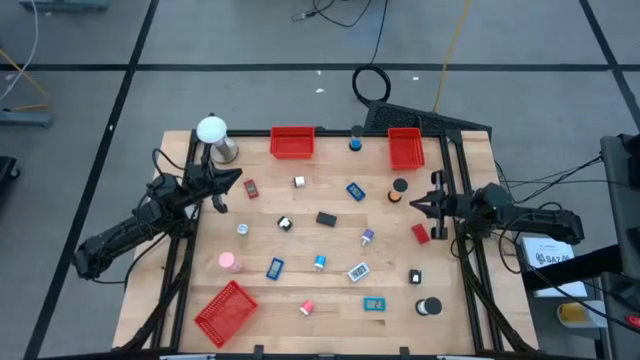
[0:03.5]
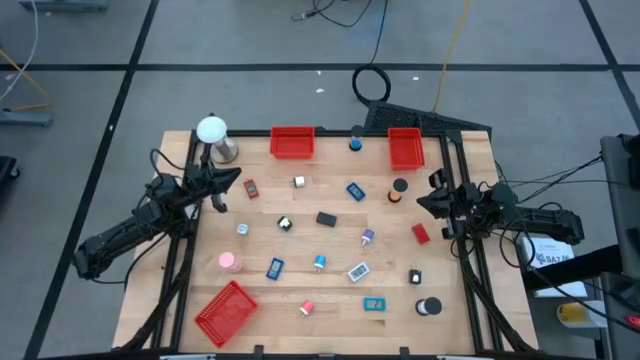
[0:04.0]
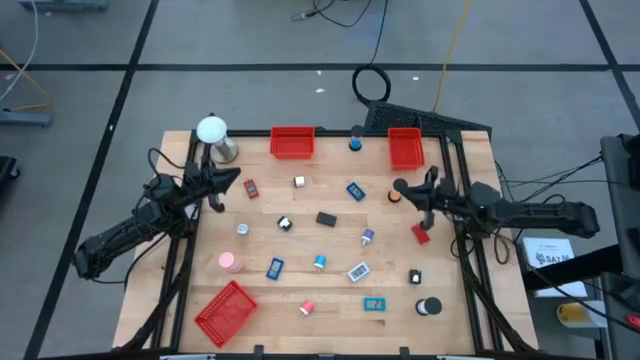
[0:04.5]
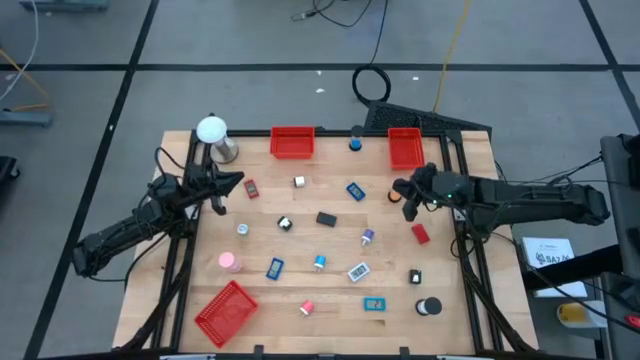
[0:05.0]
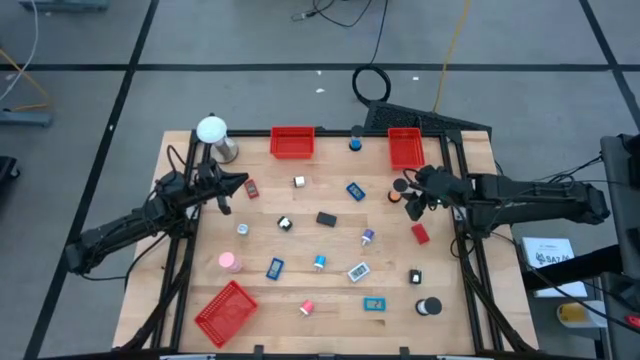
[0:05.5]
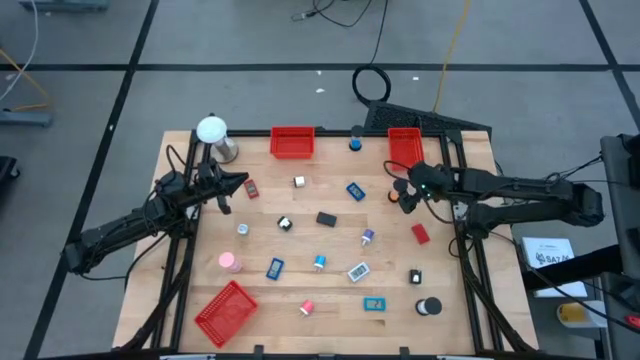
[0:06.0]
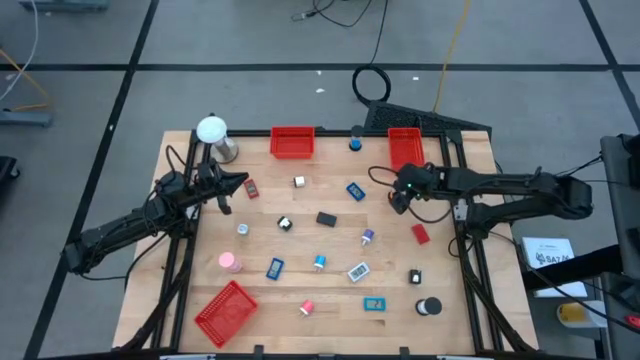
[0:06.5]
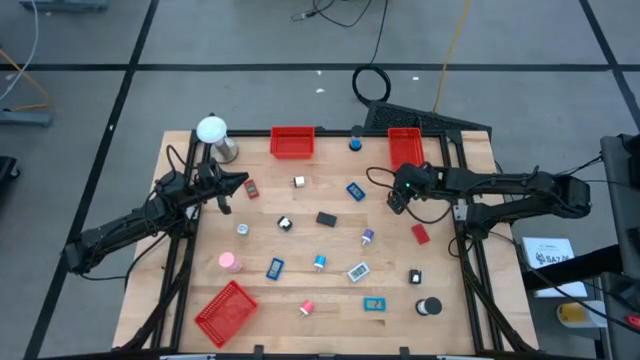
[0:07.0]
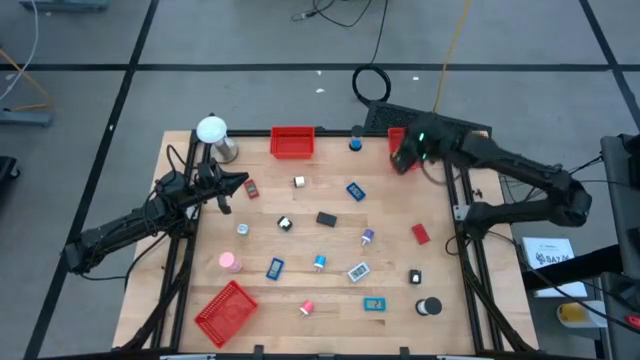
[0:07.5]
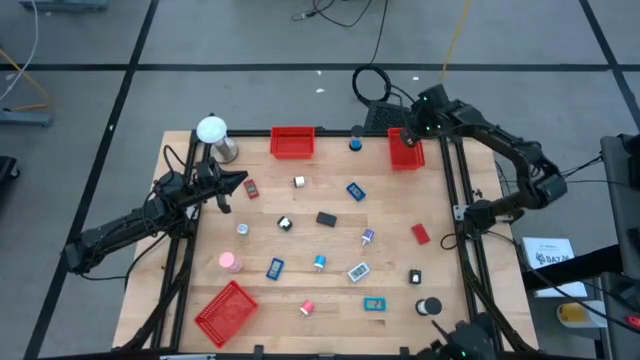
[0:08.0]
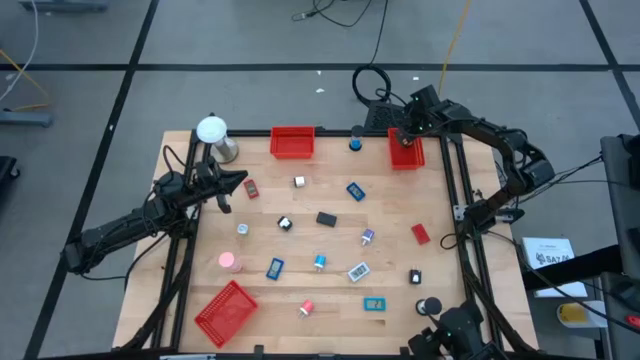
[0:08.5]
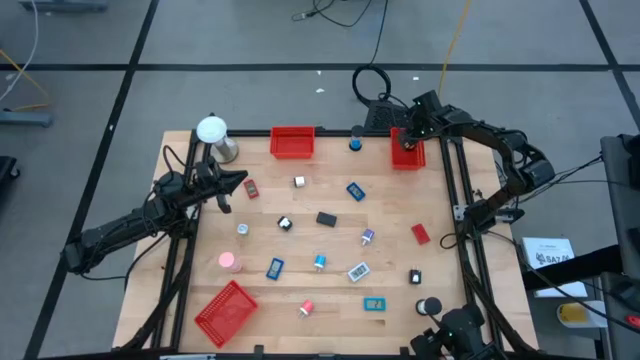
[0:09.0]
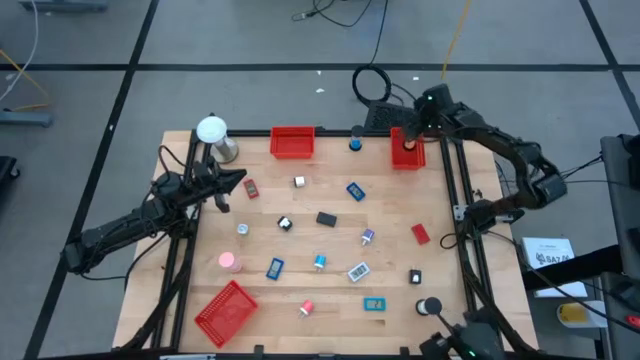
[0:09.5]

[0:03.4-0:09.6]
Task: Pick & Place Office items
Put the orange hourglass into the top right red basket

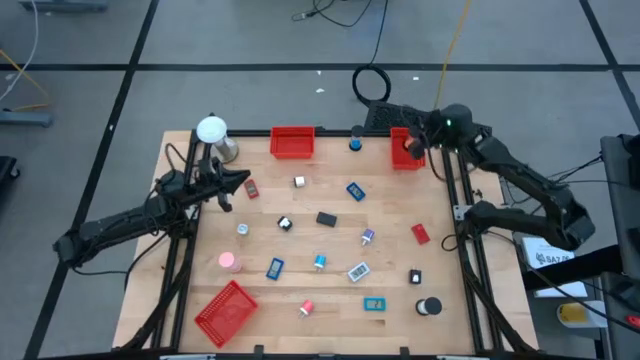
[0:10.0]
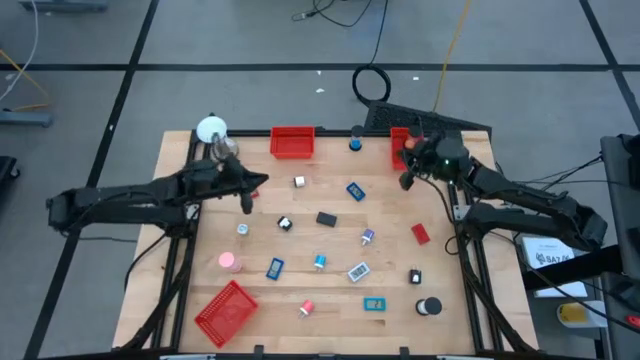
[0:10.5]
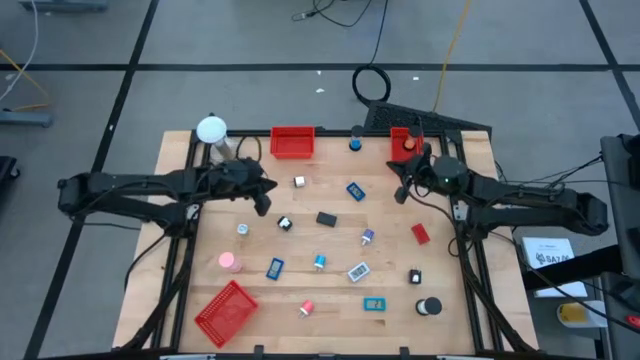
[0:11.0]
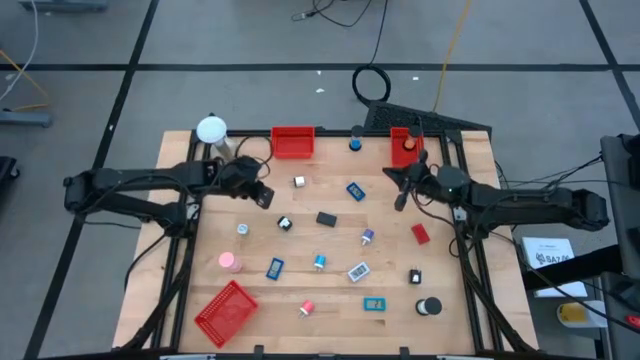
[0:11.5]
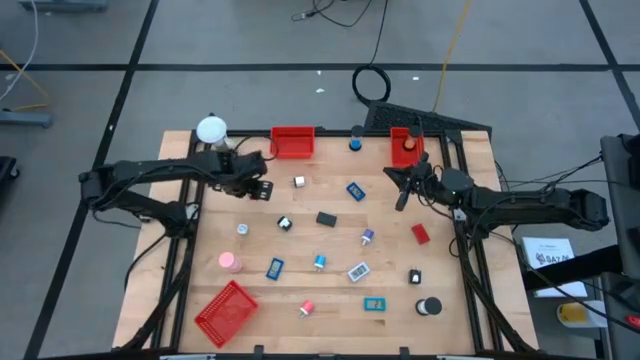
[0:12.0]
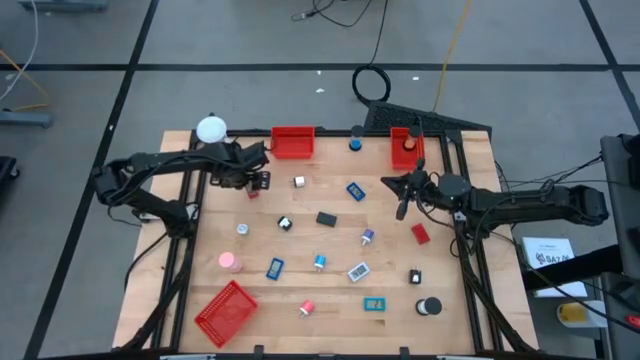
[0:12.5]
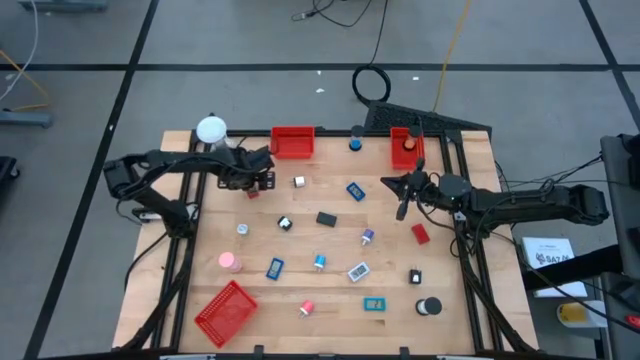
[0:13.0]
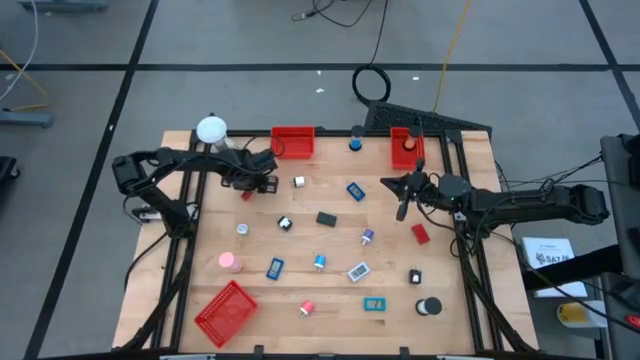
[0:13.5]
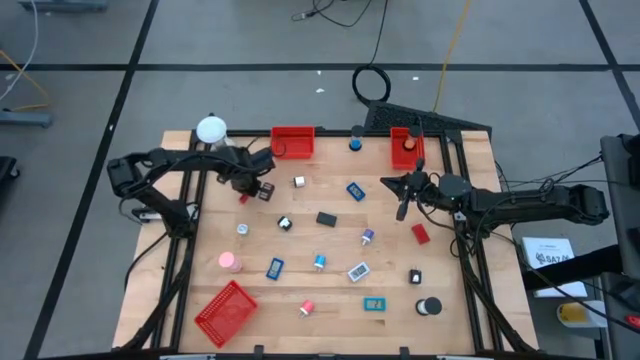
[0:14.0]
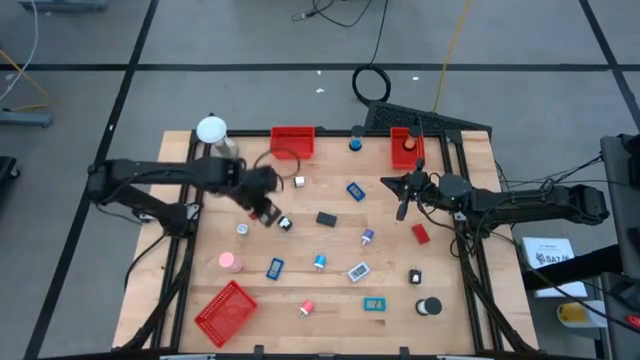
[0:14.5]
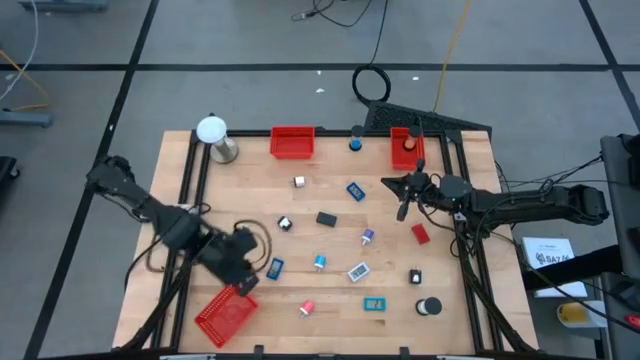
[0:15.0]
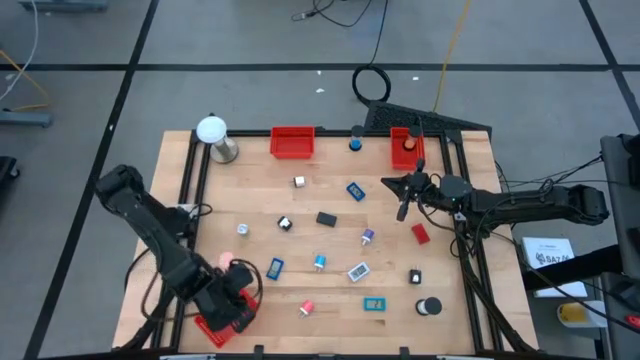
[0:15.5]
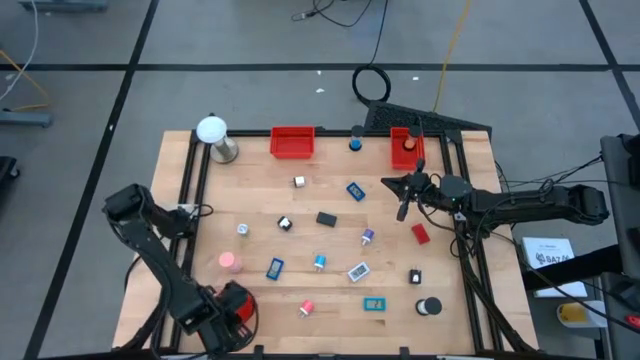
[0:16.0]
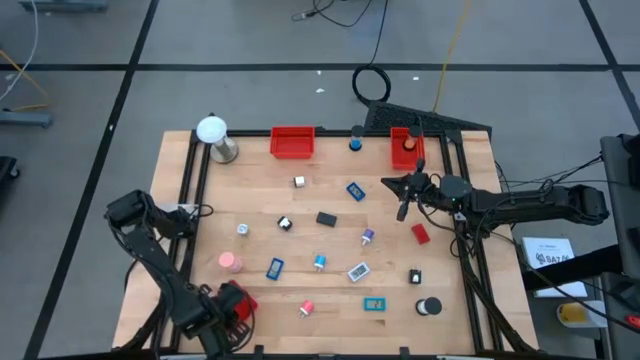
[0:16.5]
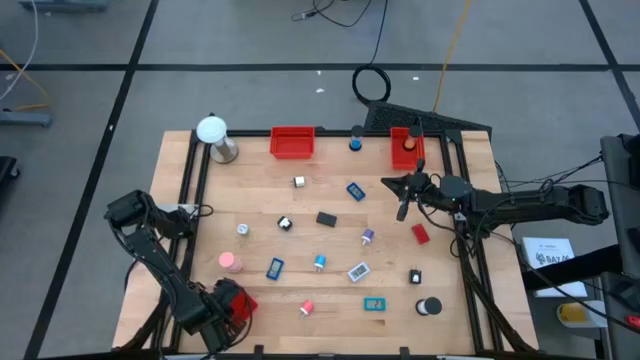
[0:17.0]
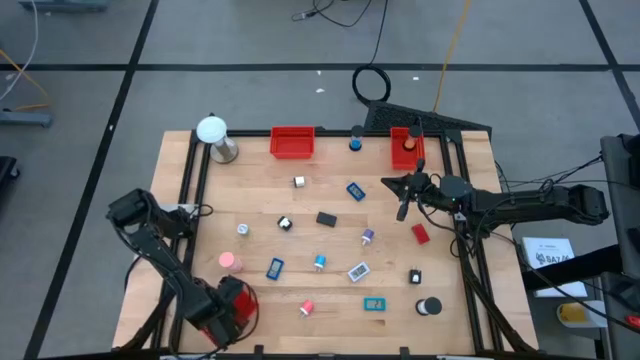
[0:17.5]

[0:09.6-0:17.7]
Put the left red timer into the bottom red basket

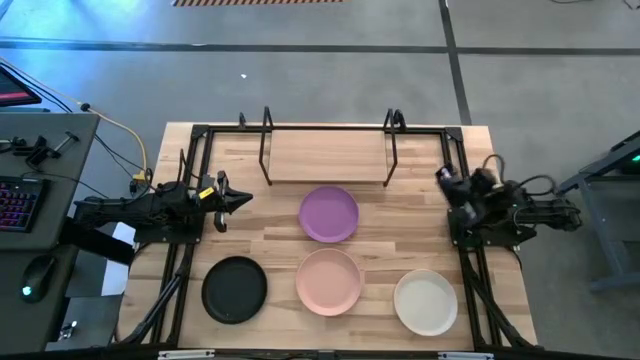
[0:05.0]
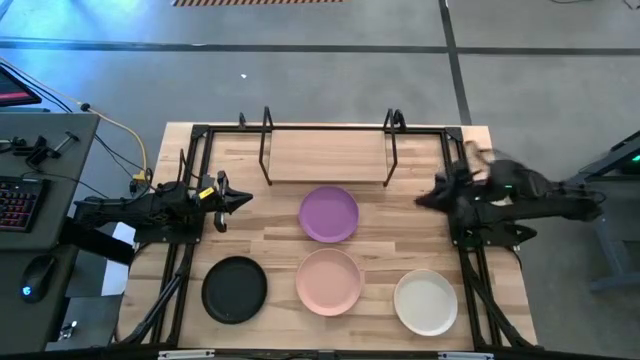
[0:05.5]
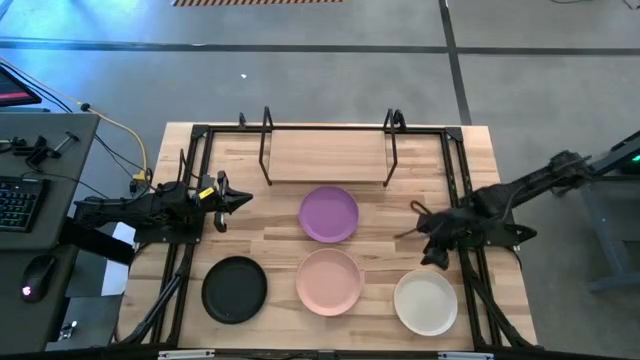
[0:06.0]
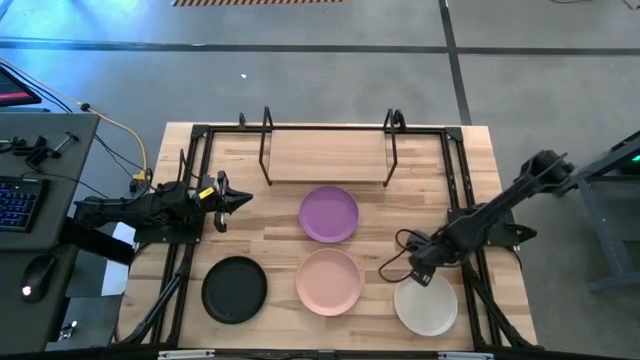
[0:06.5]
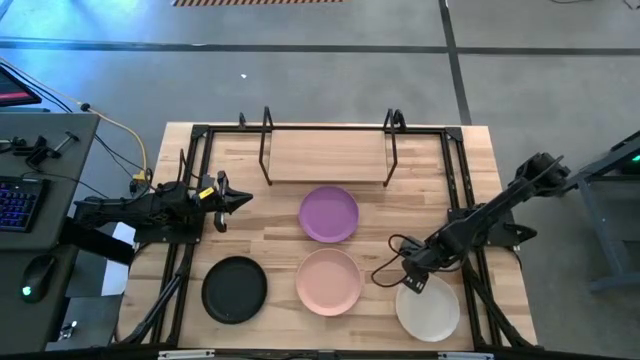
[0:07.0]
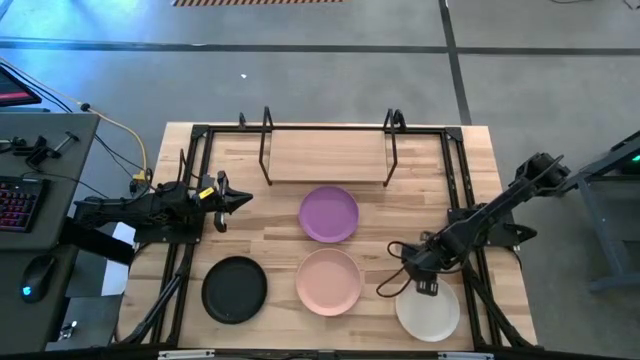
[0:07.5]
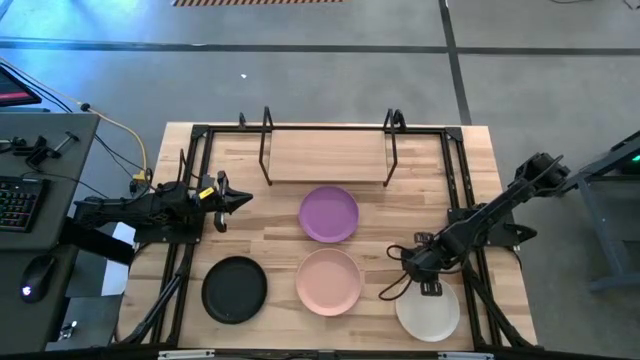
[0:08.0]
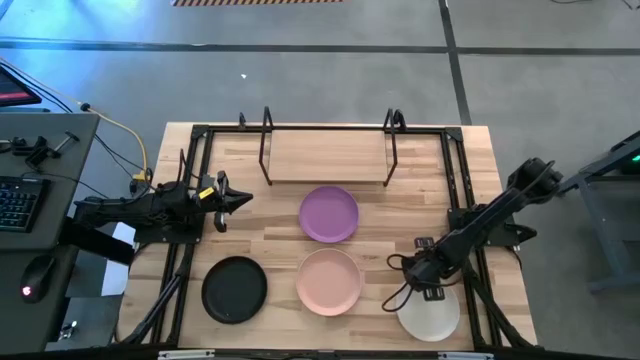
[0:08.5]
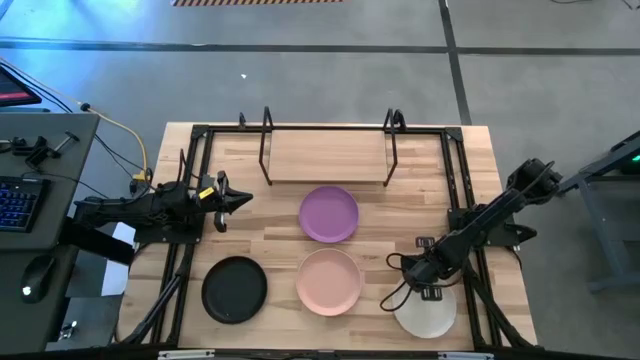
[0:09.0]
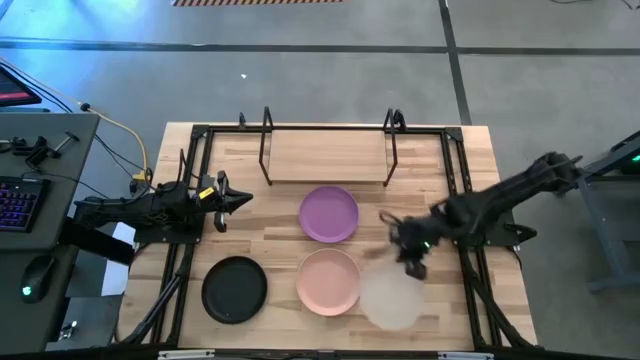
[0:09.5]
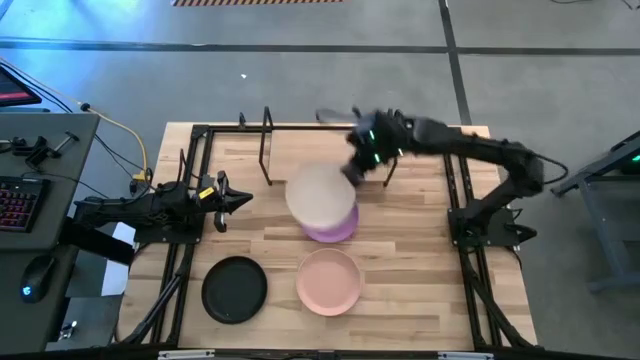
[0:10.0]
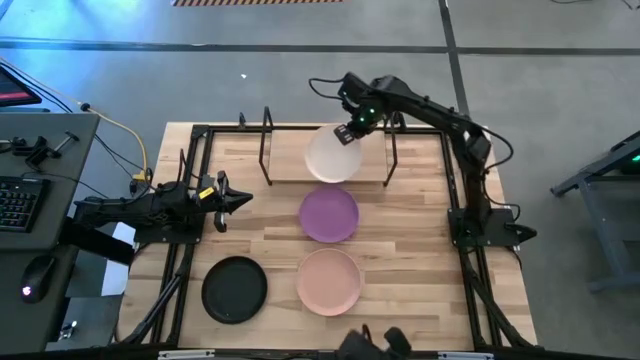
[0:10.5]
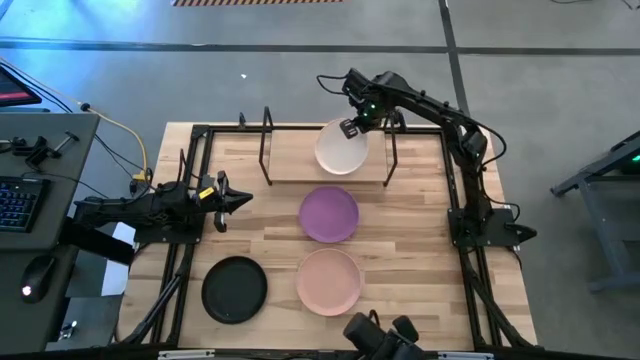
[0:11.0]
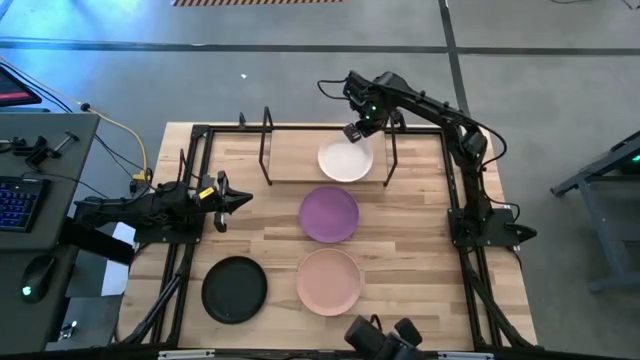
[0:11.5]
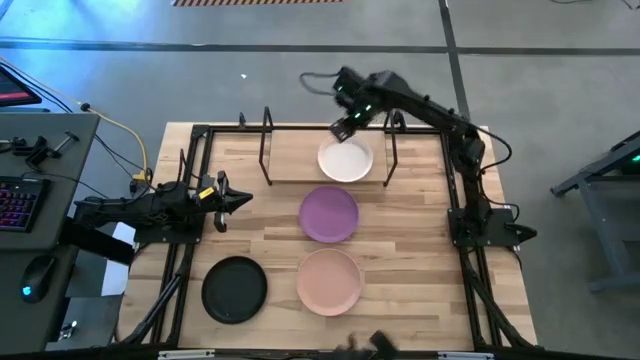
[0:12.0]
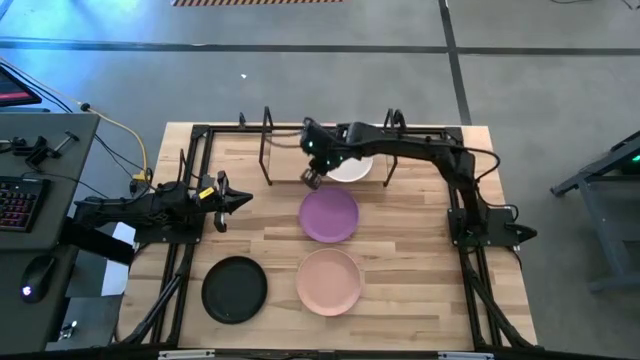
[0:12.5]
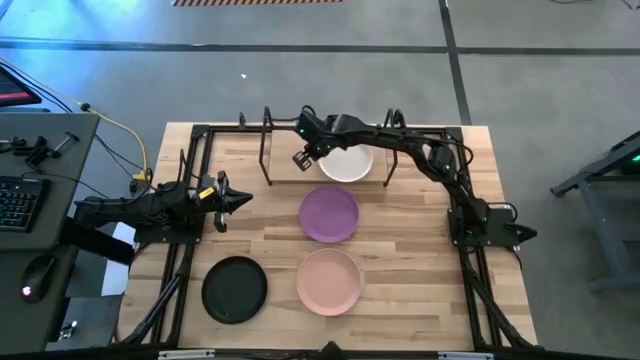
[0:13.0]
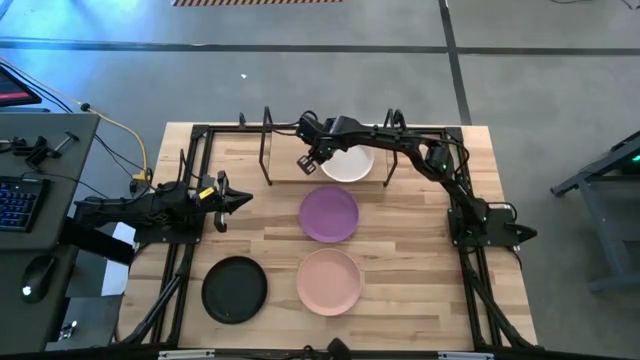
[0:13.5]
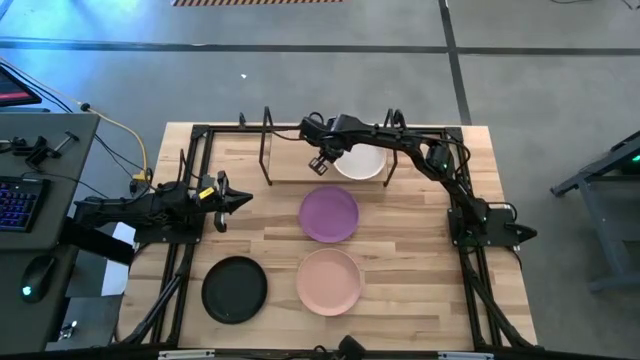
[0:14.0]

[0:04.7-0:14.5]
Task: Place and stack plates onto a shelf
Put the white plate on the shelf
